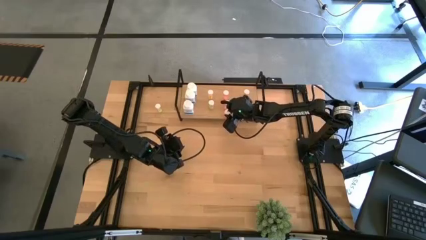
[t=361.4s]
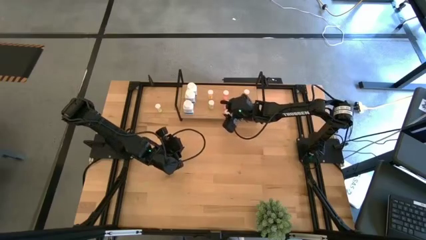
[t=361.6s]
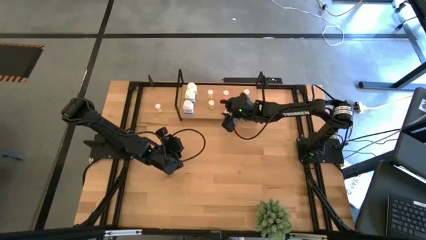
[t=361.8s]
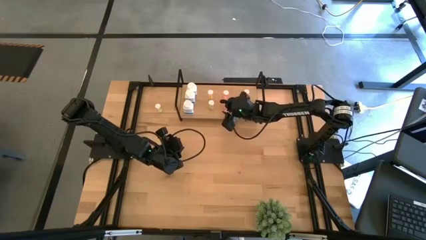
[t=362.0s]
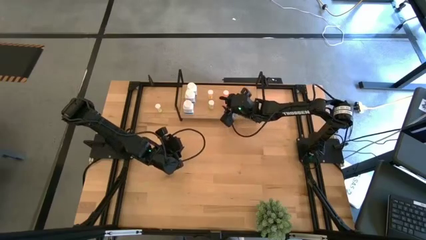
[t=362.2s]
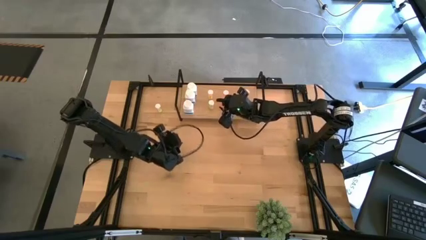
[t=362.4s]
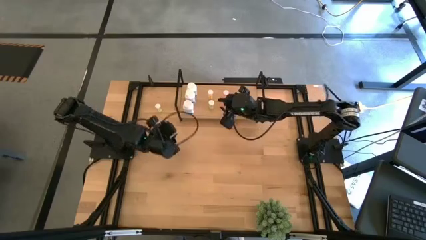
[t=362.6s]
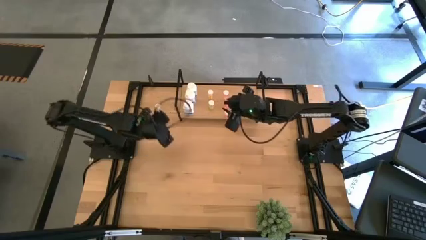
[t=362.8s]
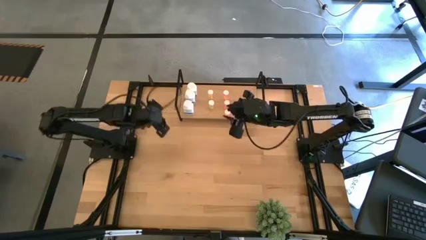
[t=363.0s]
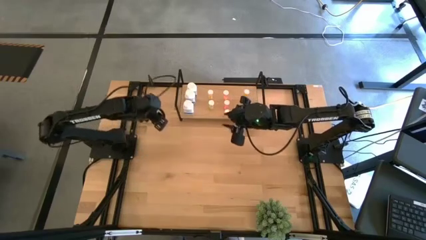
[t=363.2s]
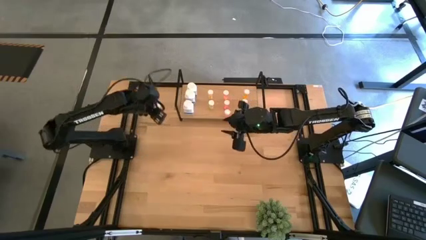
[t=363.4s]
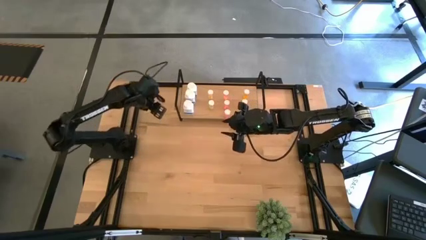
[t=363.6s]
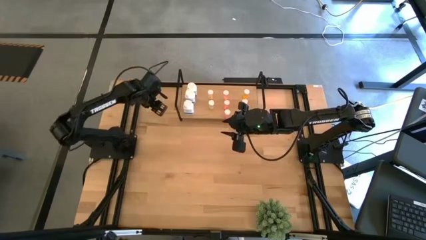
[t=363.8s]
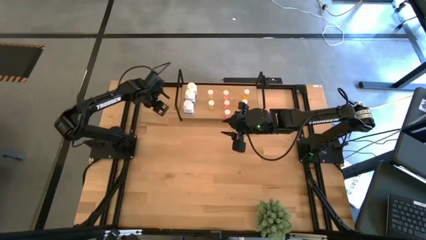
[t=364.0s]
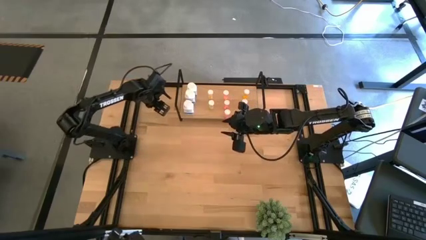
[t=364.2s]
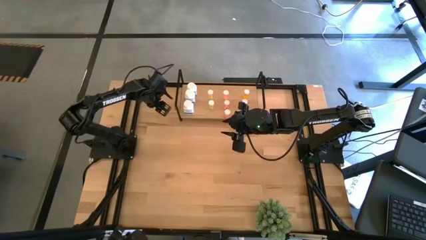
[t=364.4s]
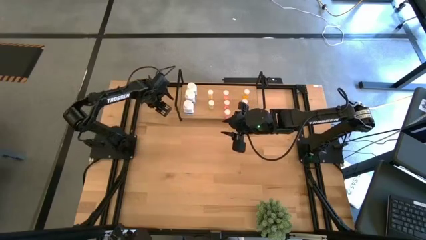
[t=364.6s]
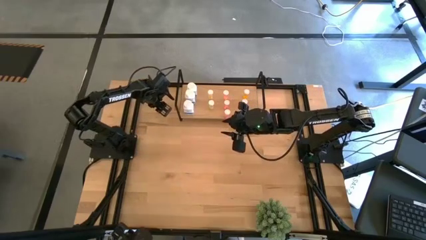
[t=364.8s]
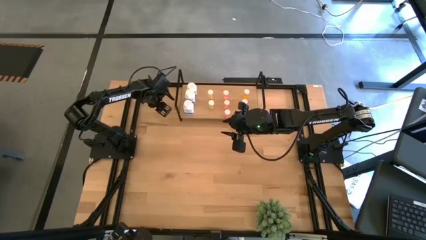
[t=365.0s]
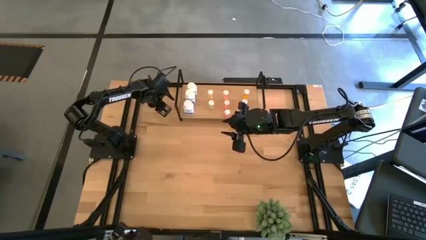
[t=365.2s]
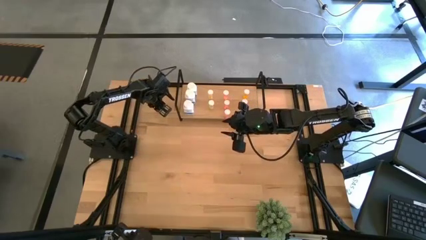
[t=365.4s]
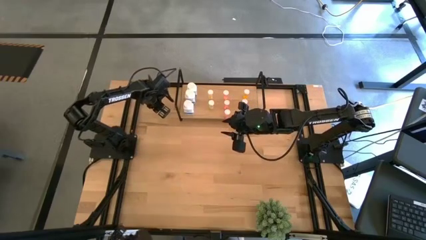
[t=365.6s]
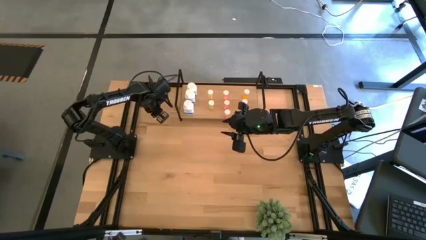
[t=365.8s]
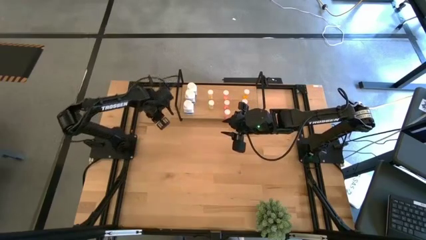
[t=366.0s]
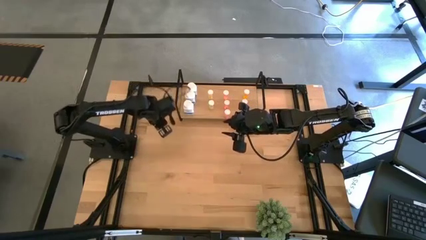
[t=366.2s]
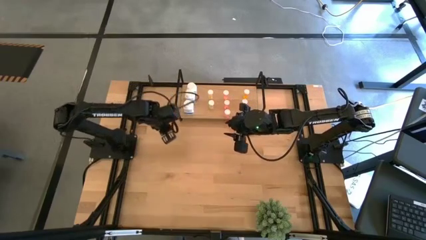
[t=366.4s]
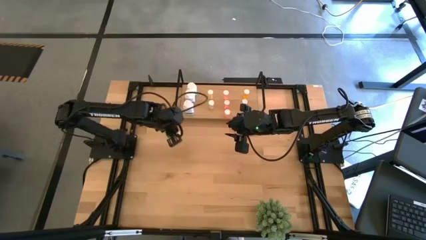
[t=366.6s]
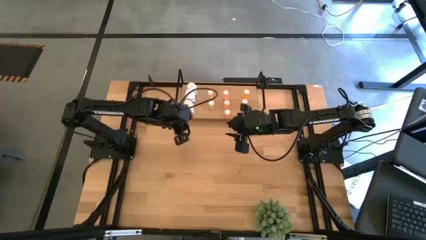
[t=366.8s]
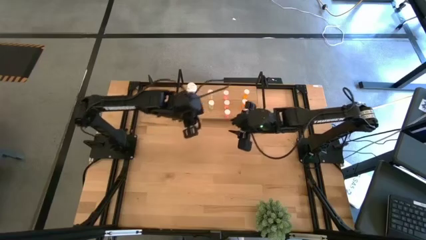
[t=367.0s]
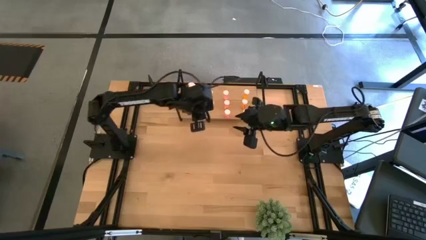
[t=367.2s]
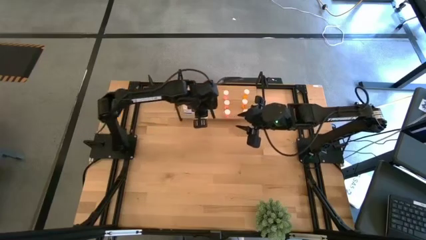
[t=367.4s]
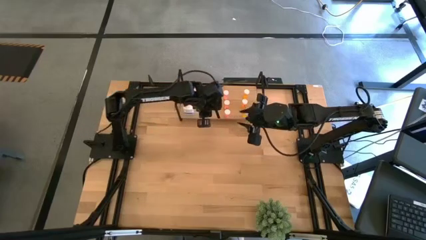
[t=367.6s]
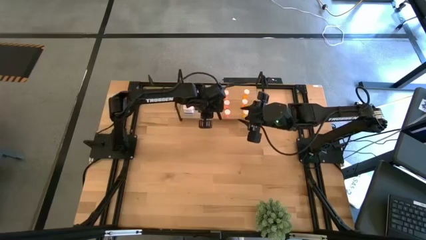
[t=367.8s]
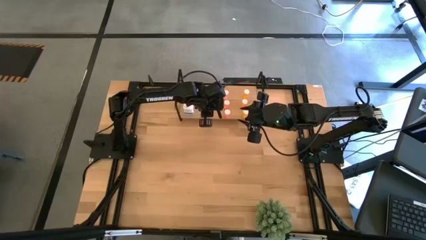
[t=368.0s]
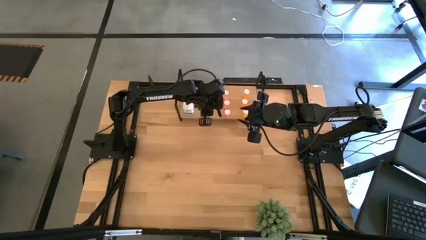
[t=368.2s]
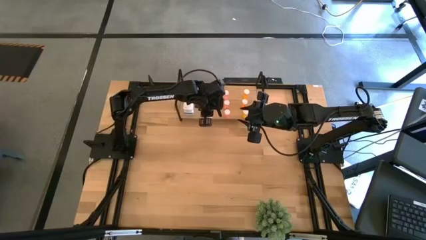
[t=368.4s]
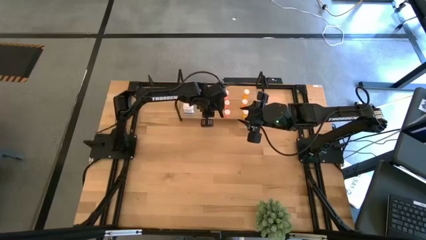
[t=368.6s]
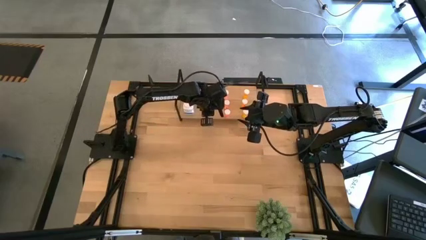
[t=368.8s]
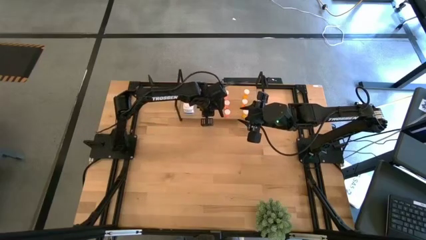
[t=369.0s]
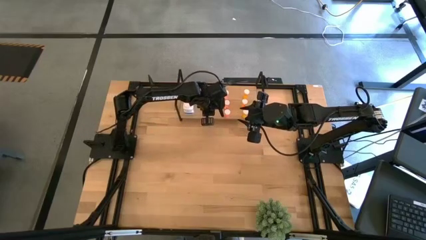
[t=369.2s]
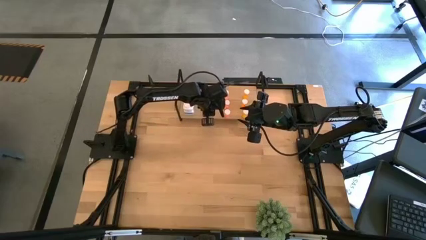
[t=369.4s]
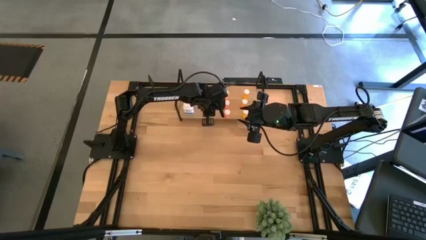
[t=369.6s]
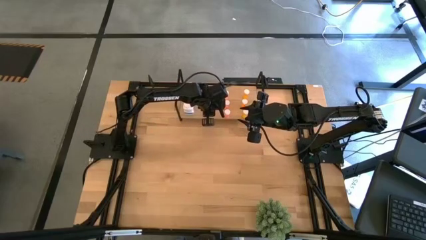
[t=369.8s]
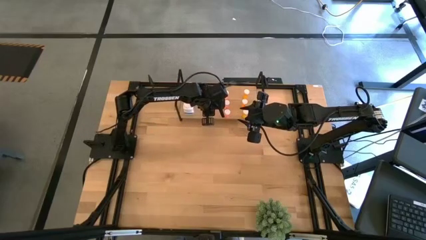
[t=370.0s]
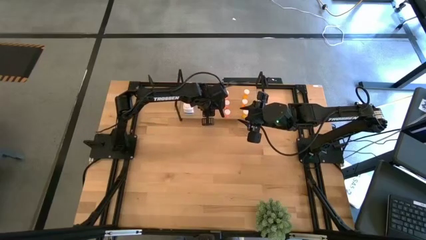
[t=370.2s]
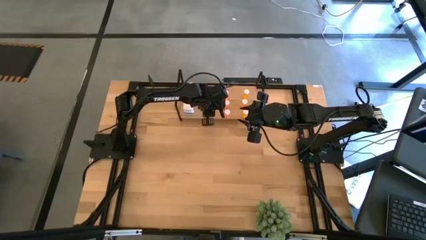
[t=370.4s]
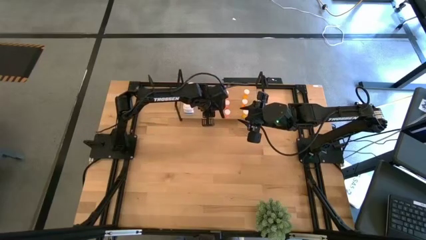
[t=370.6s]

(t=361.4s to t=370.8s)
Task: Pick and place medicine bottles onto shelf by color
Put the yellow pill bottle on the shelf aligned with the other yellow pill bottles

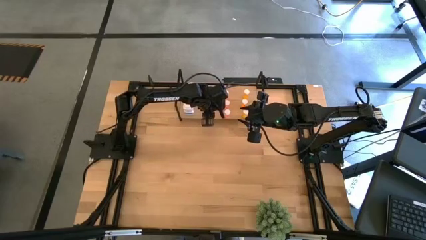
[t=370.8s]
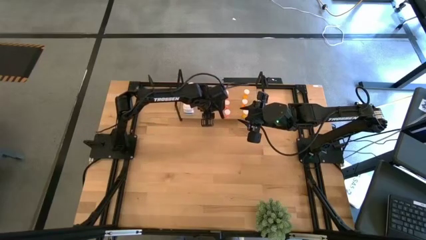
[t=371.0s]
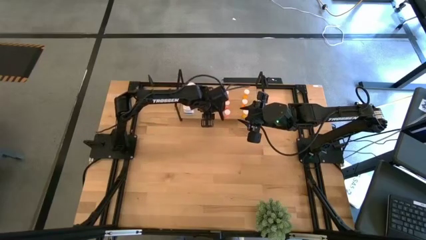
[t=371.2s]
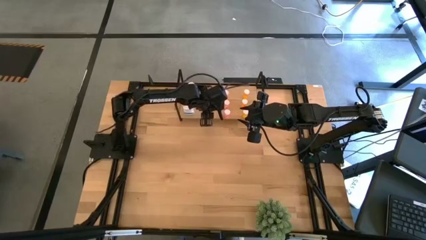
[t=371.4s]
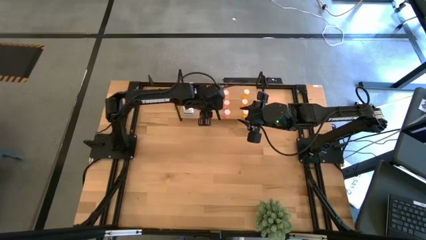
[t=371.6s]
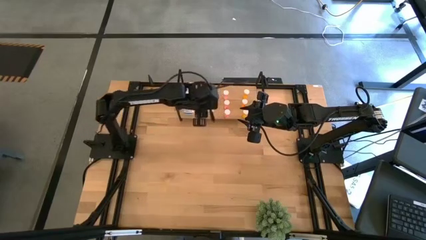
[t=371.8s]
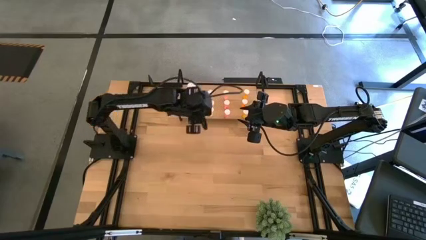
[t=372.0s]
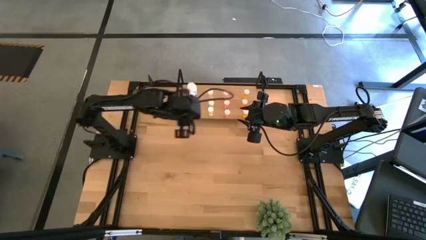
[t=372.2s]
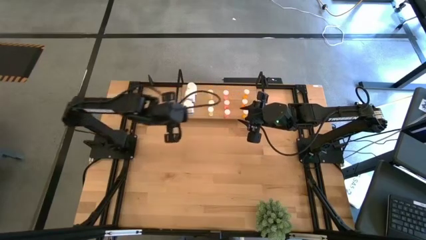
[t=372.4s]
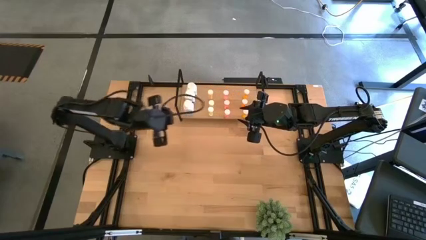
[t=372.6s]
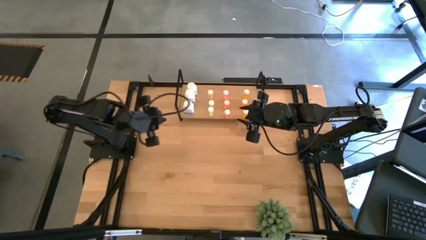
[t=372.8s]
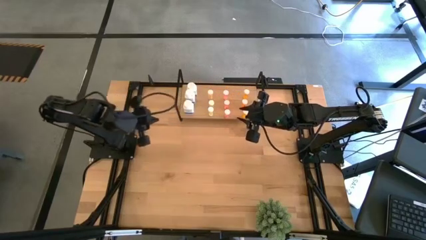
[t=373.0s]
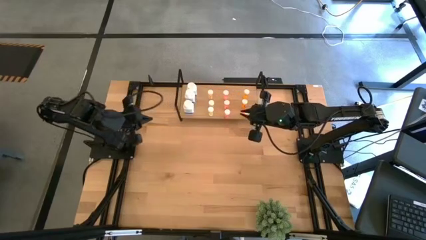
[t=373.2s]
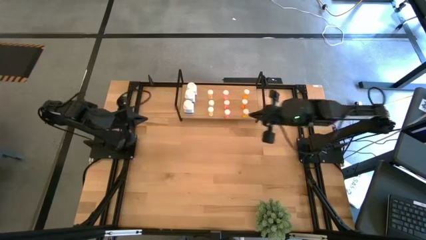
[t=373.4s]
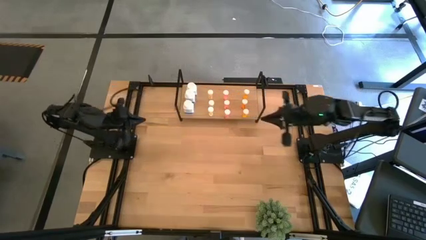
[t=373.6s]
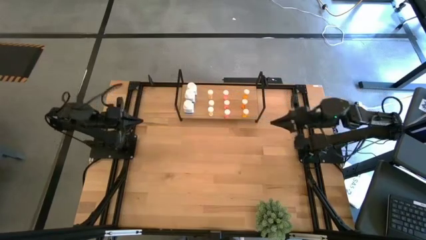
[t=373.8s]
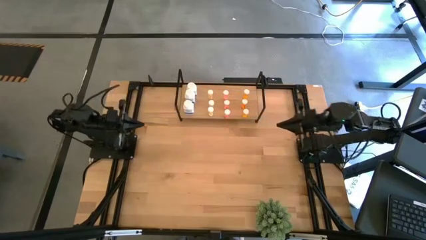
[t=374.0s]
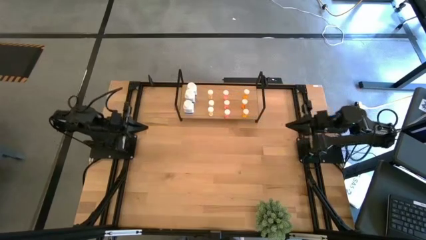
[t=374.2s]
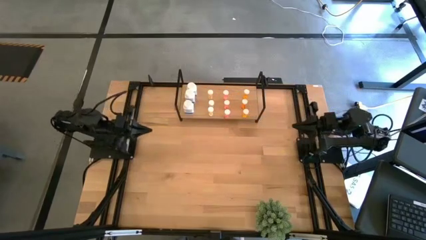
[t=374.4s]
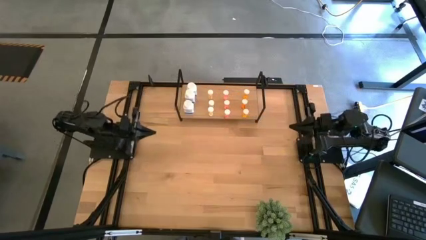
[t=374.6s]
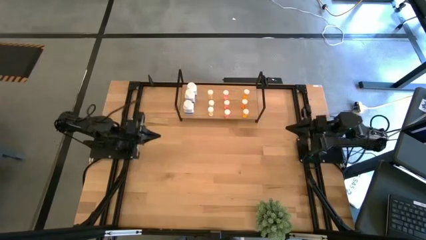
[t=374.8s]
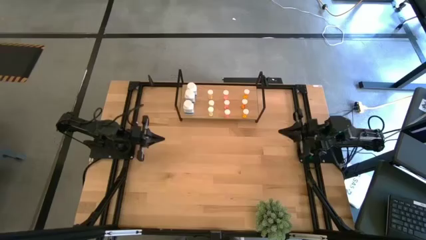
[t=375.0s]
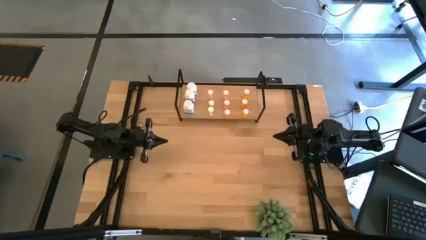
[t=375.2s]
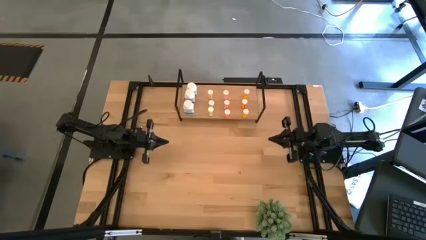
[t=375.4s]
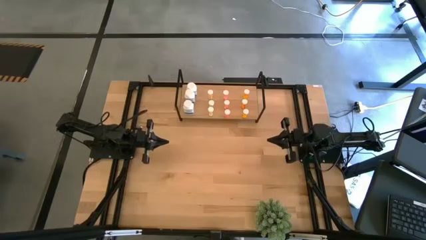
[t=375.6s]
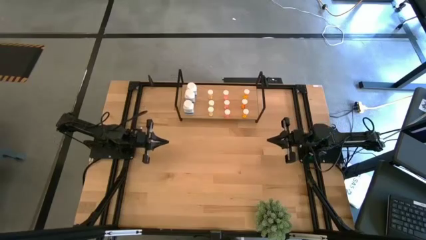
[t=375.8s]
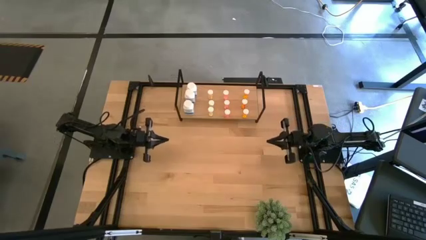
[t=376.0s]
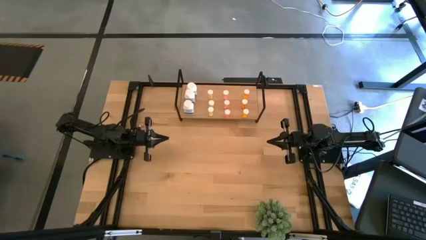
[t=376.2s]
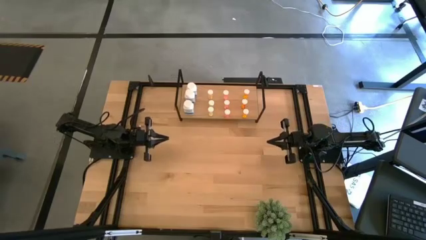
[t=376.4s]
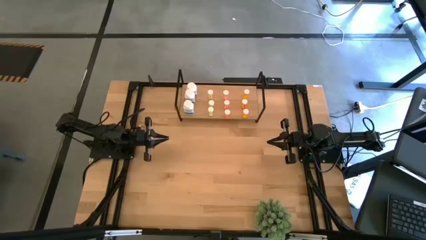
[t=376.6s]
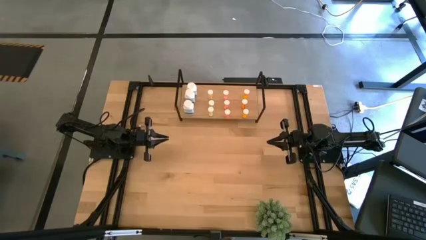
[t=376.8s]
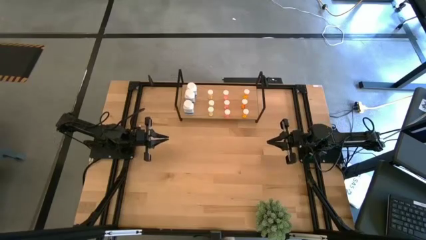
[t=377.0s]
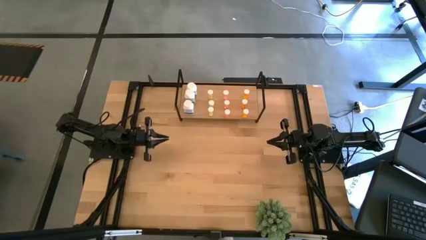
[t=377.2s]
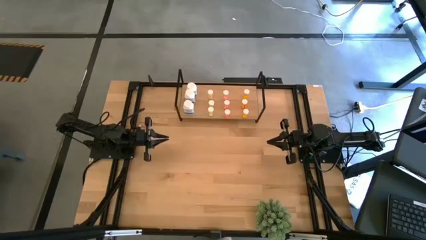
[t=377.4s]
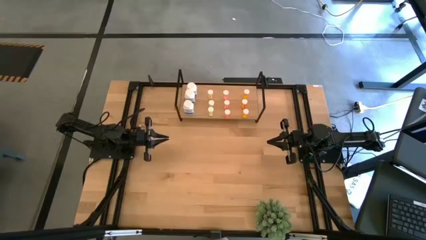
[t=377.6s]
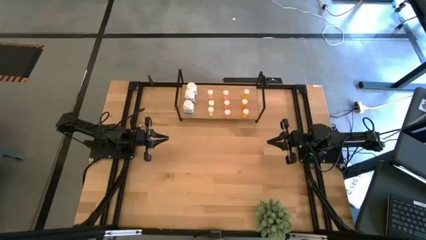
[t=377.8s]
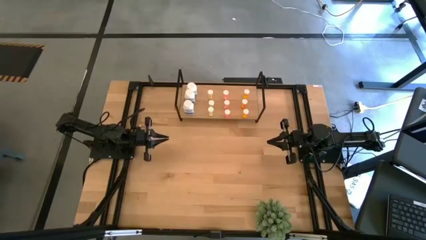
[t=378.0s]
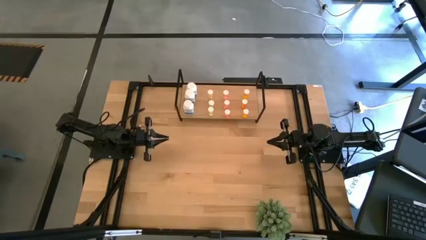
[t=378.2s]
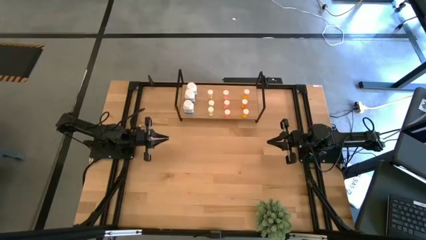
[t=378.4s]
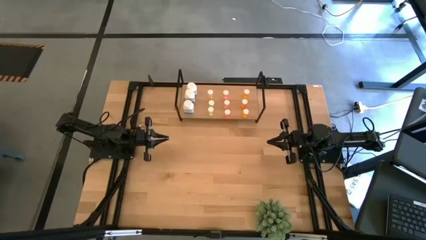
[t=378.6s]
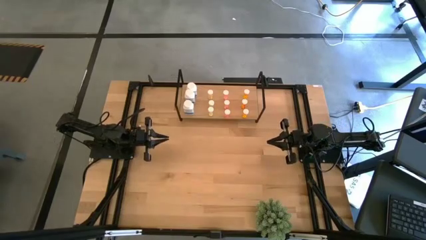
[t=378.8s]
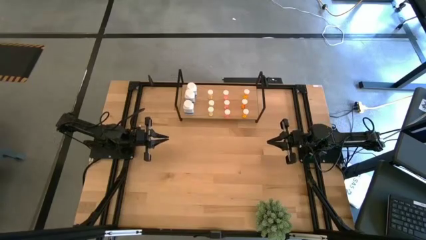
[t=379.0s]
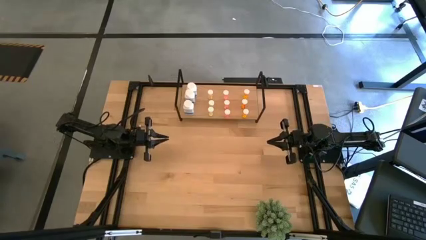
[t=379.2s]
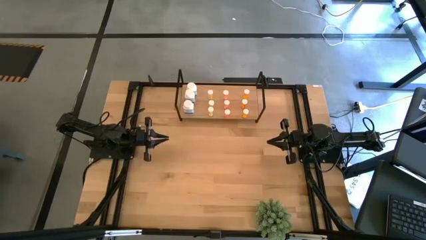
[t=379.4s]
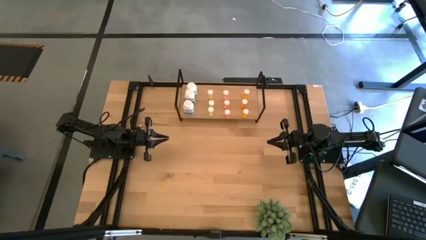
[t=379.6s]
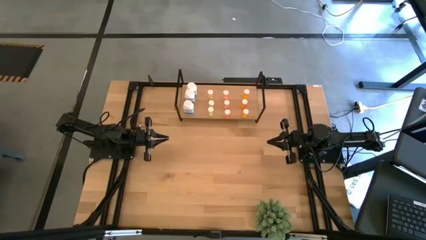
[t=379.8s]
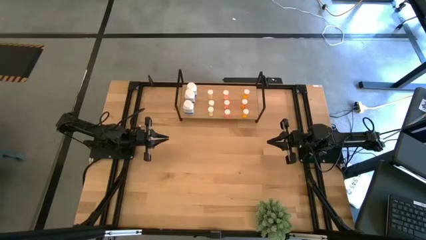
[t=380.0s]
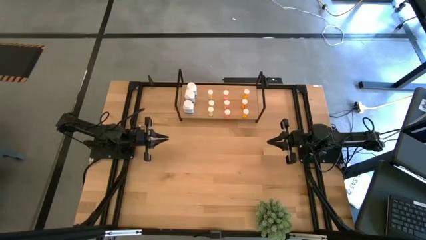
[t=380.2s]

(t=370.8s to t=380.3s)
Return to Home Position
